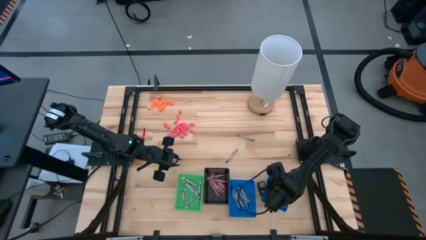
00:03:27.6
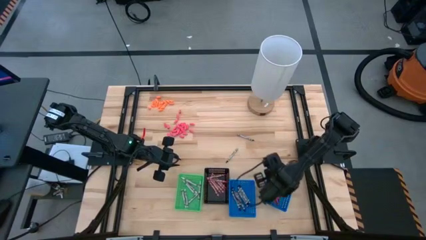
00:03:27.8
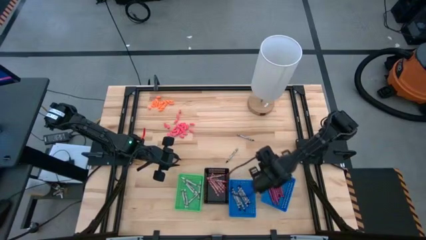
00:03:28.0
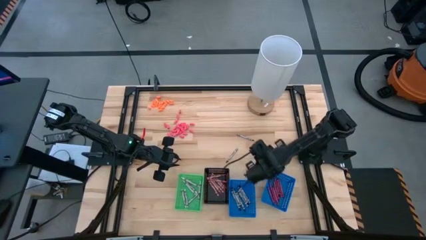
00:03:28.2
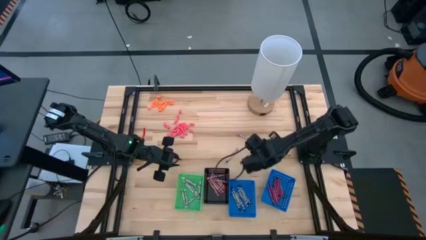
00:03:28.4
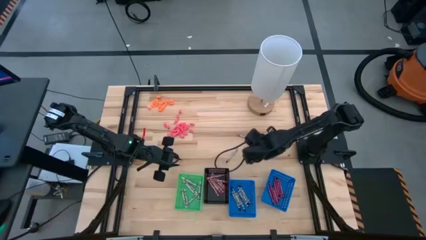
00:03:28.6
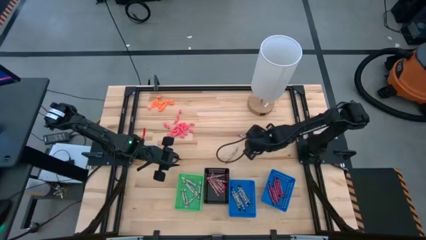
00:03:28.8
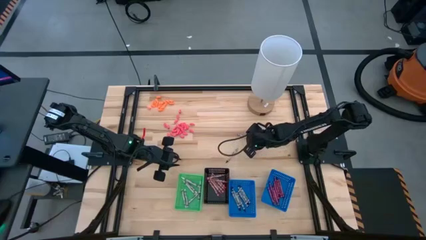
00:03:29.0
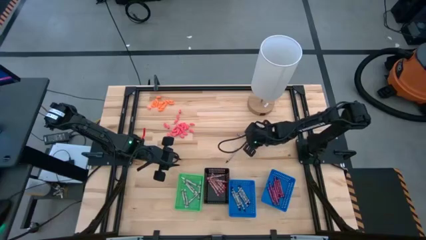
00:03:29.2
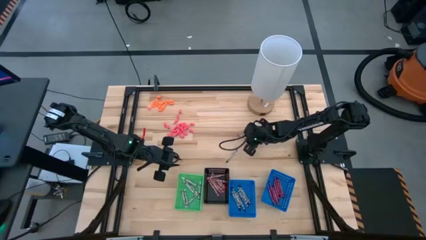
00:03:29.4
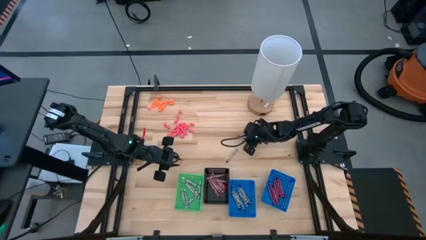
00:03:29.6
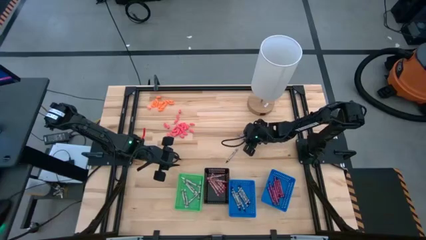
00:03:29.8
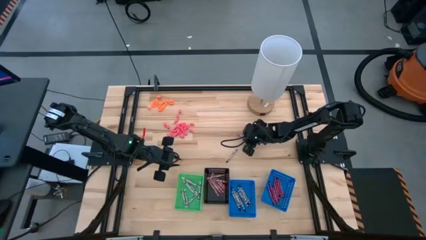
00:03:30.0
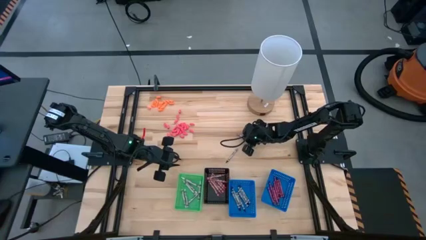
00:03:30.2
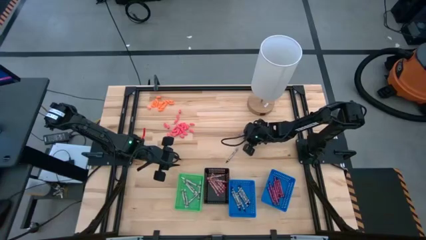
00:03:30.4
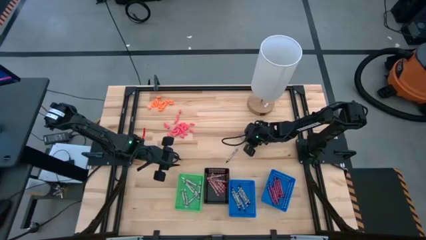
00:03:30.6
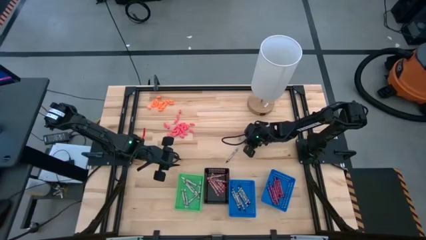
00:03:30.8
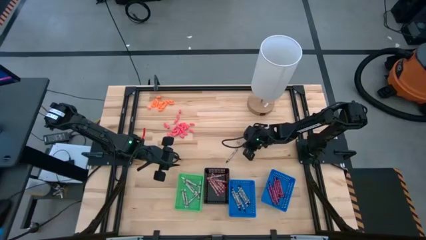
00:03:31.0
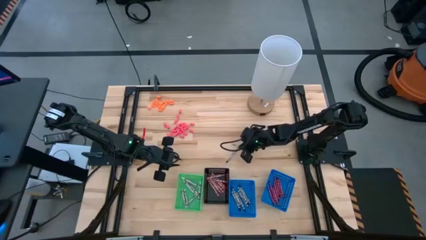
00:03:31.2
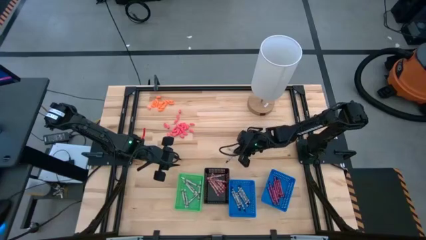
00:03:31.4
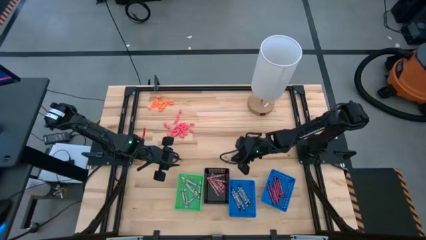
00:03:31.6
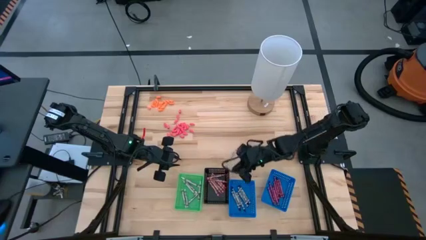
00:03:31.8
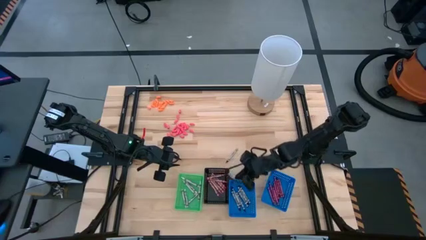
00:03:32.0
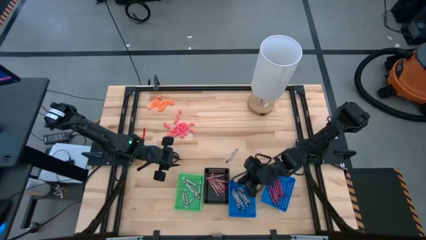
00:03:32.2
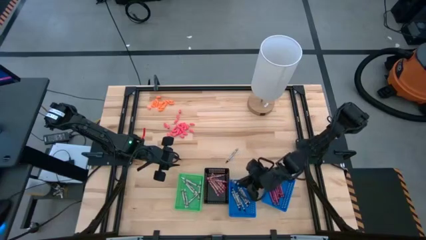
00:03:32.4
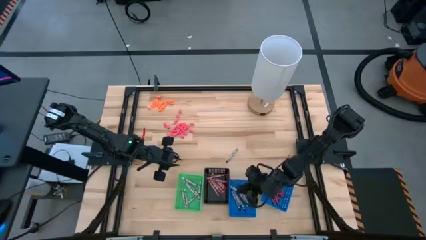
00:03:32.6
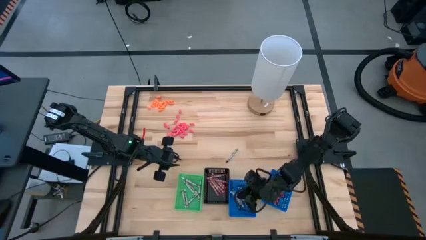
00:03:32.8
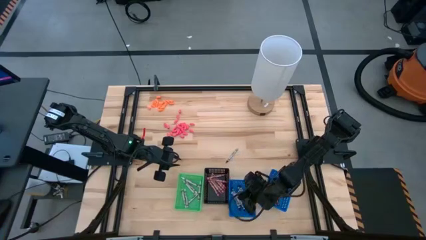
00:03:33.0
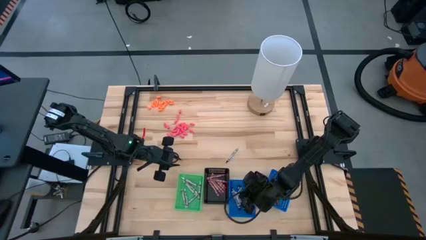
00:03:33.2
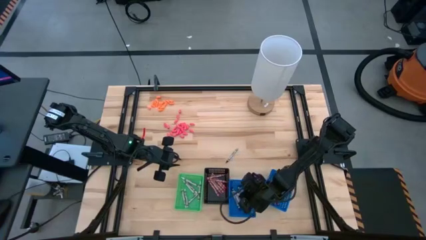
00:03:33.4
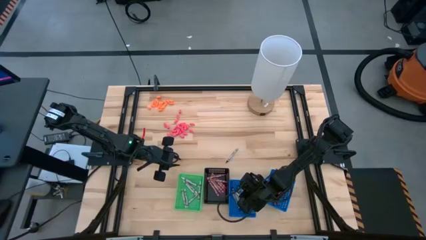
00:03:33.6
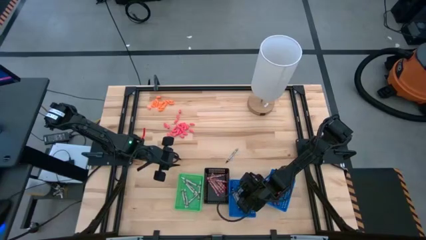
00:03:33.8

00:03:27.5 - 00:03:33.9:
Task: Sort crayons
Put the black crayon into the left blue bin

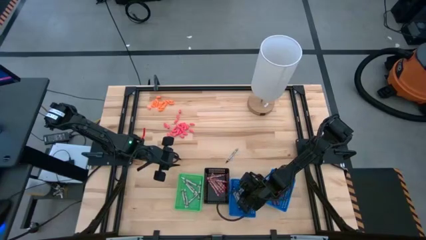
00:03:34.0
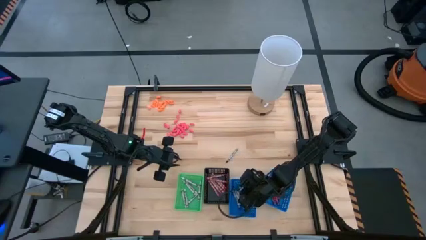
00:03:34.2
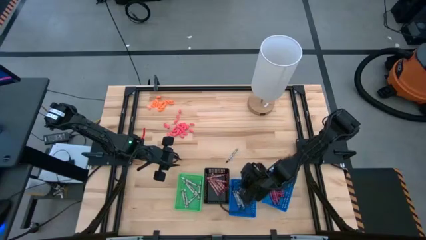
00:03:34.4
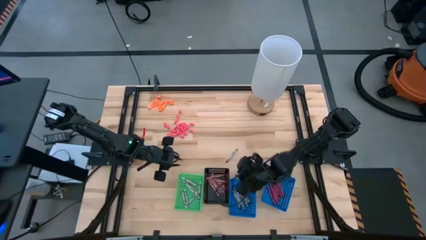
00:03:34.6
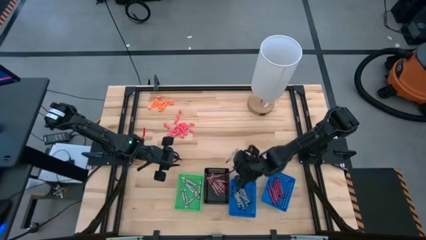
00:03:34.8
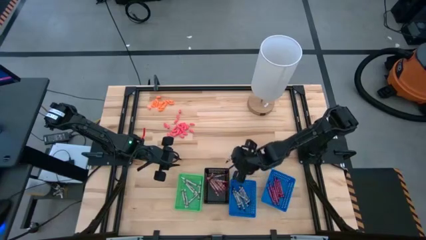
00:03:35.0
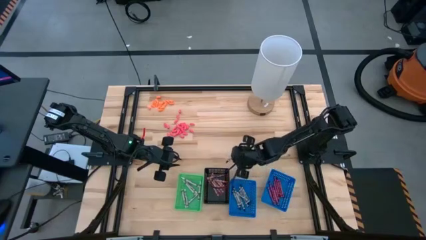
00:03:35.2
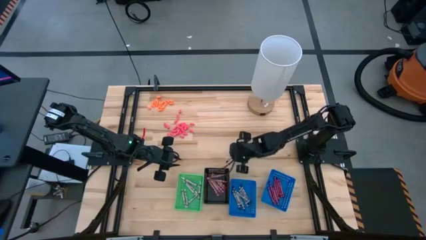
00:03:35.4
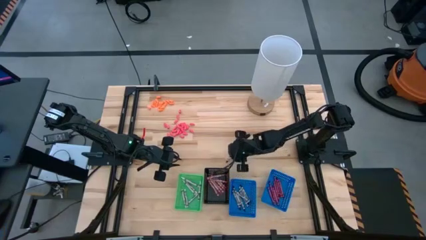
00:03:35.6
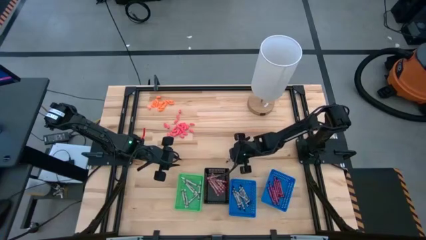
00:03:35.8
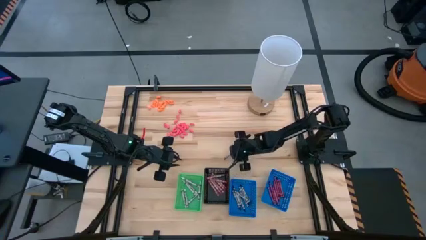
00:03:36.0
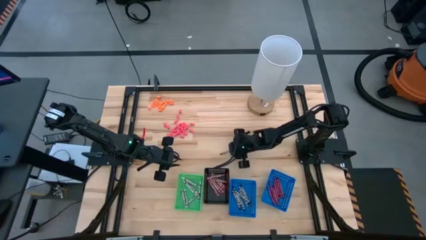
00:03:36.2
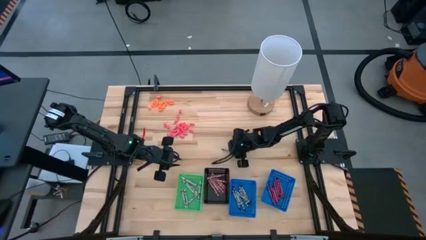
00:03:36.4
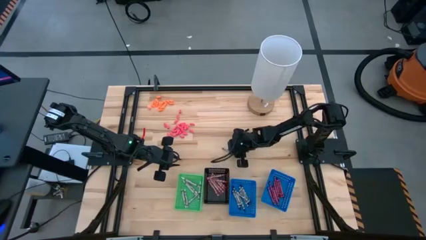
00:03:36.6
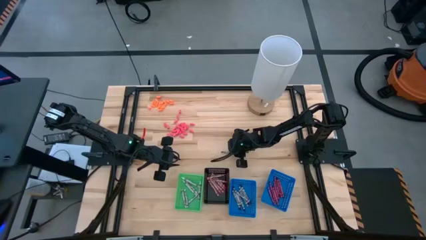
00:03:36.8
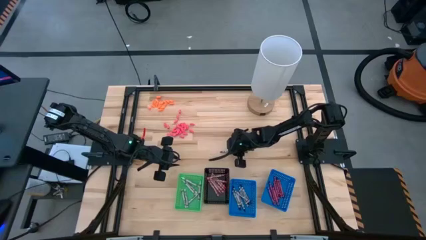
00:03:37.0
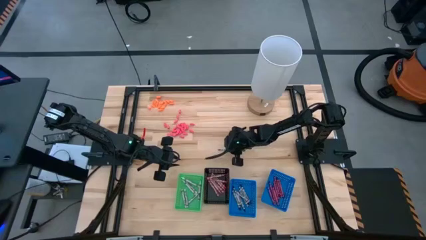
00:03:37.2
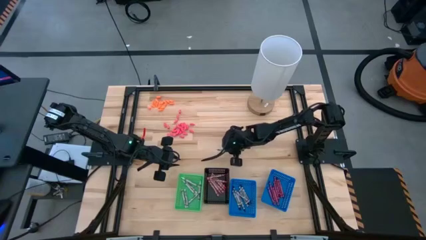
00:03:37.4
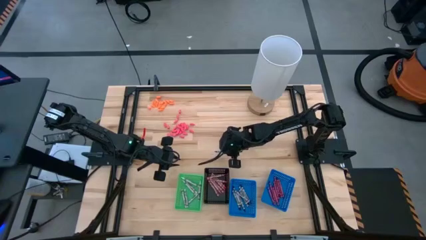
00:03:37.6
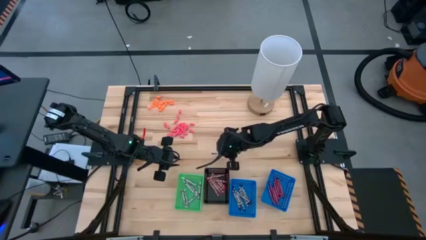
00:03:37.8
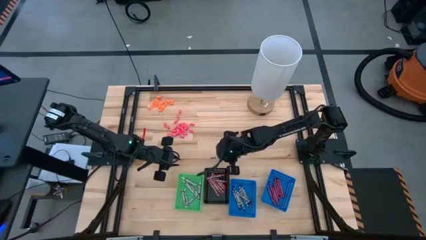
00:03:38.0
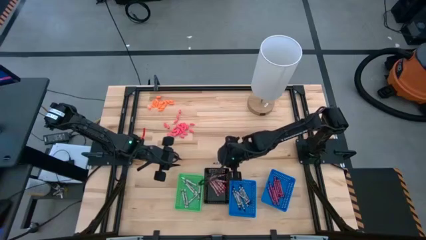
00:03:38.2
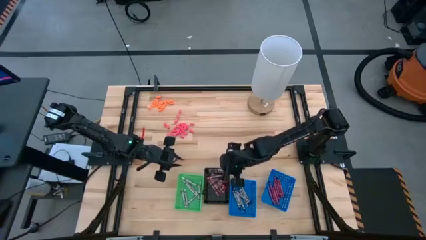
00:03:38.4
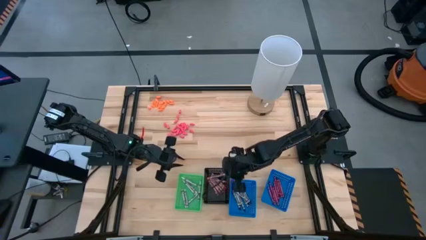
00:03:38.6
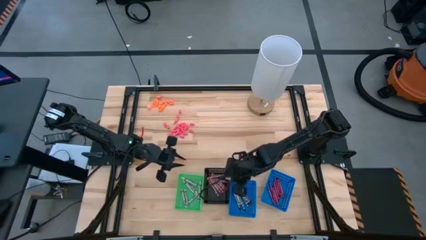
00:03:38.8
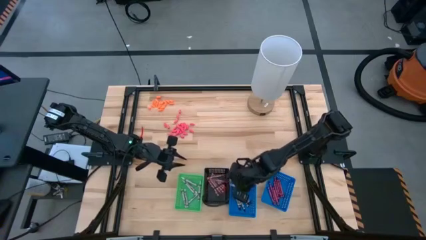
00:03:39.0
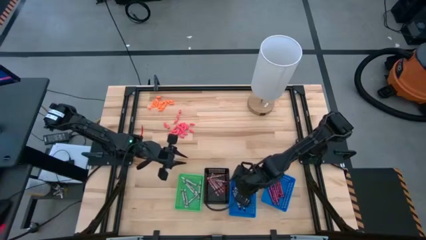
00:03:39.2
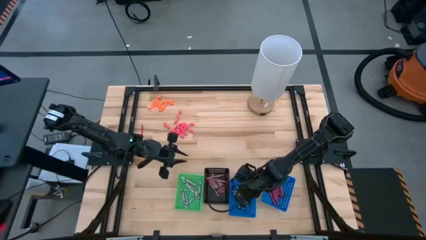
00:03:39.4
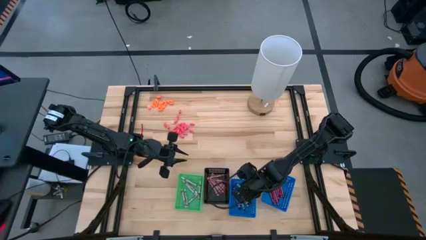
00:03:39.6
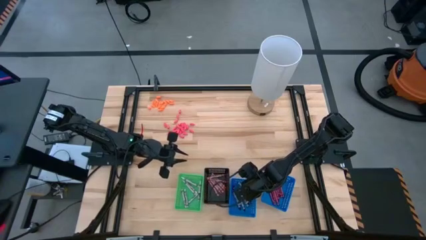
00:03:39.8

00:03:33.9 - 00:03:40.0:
Put the black crayon into the left blue bin
